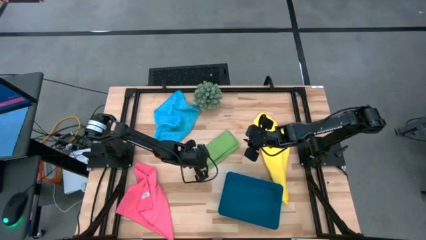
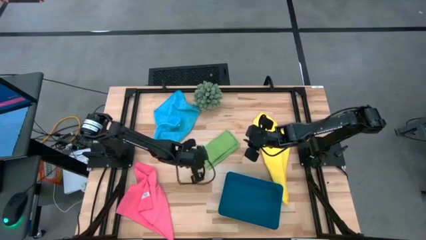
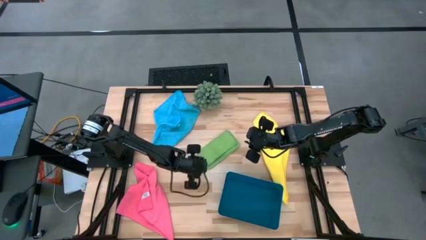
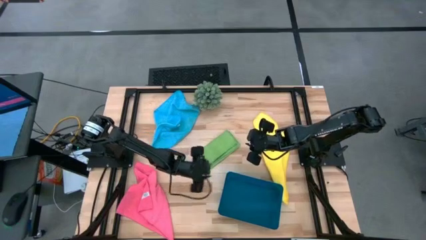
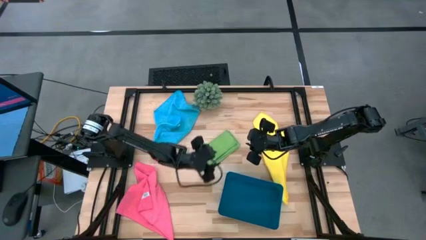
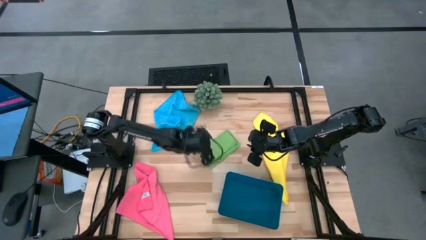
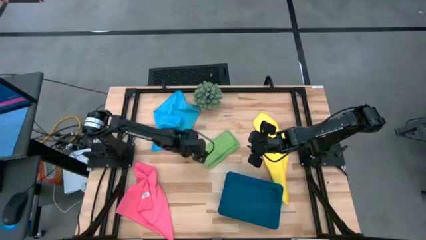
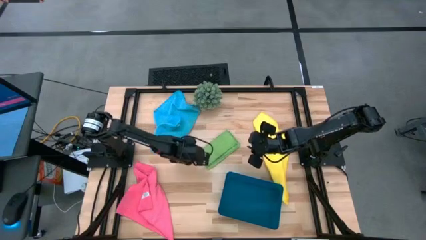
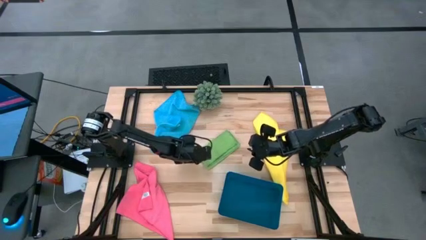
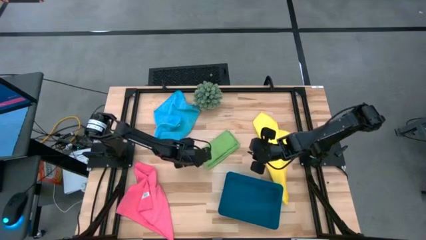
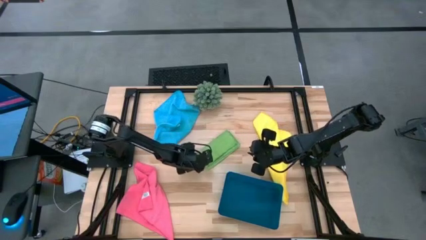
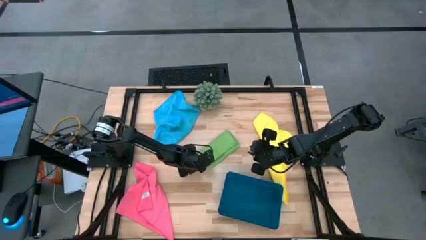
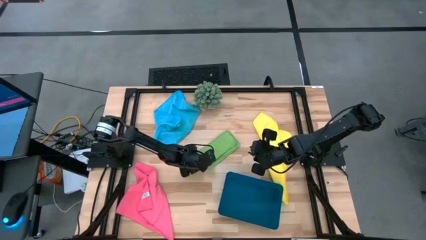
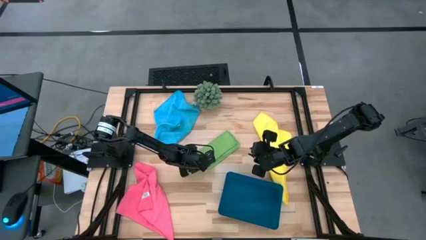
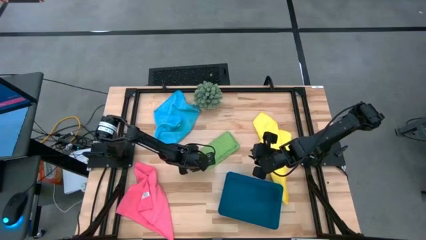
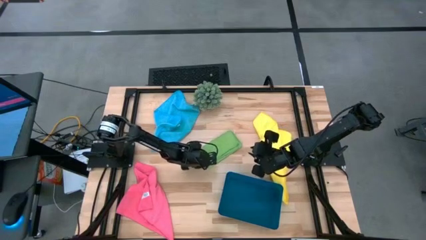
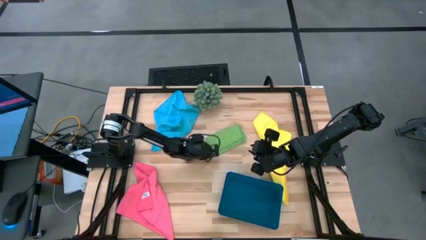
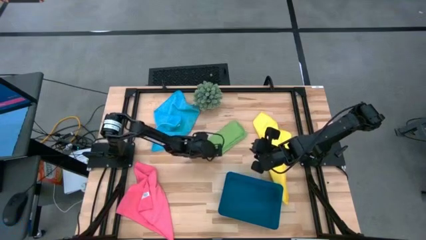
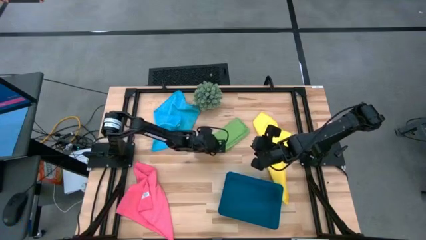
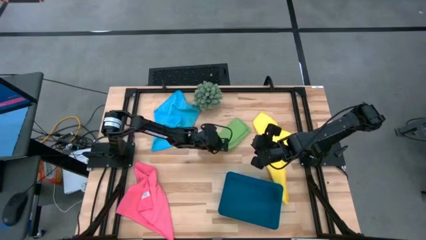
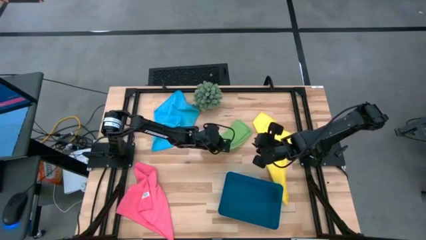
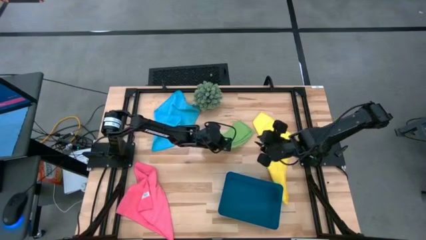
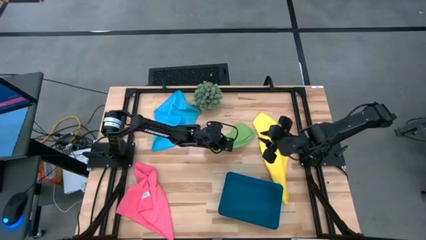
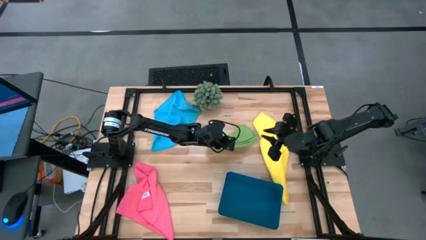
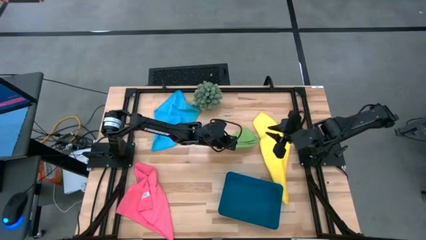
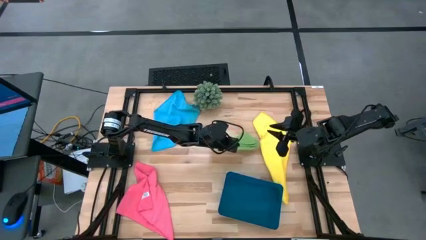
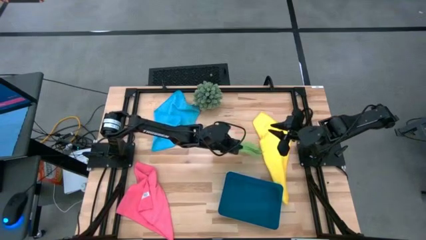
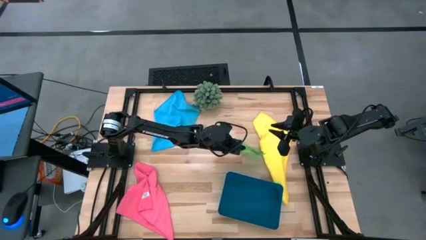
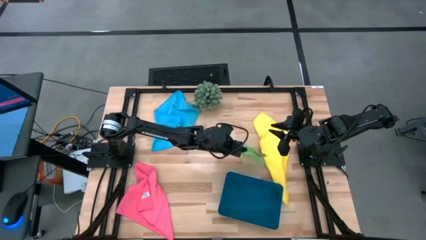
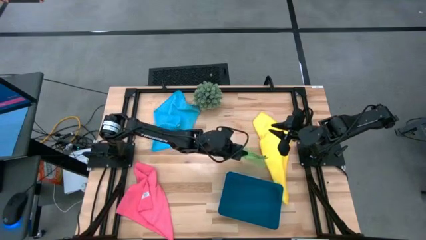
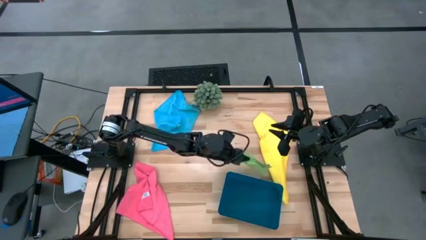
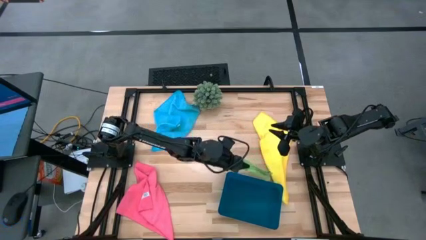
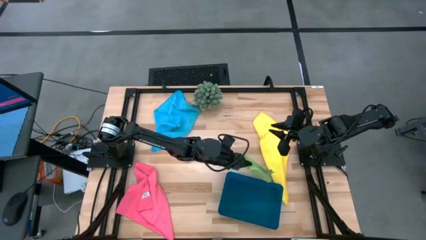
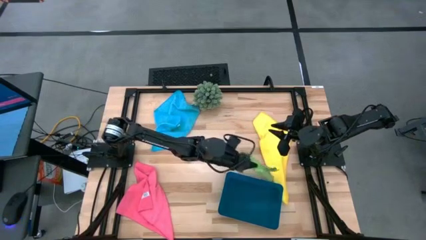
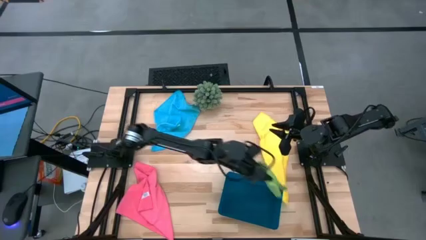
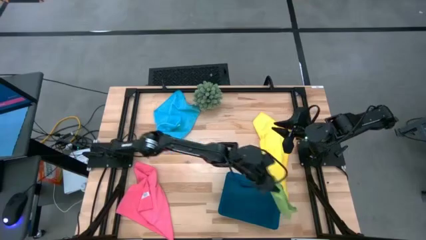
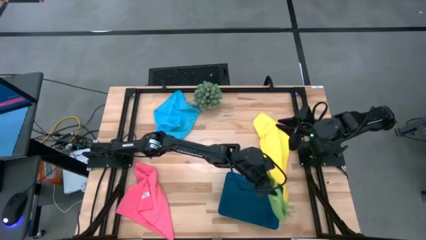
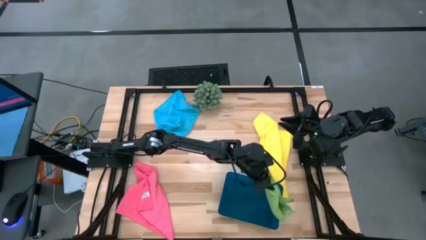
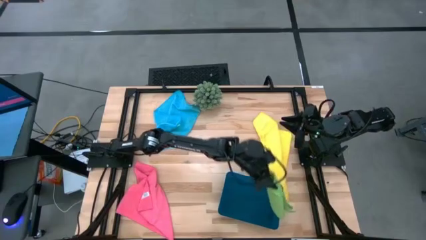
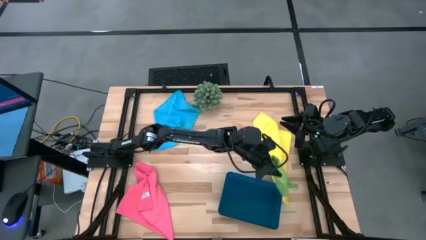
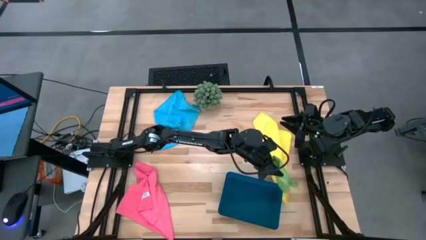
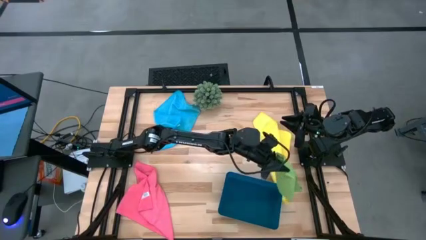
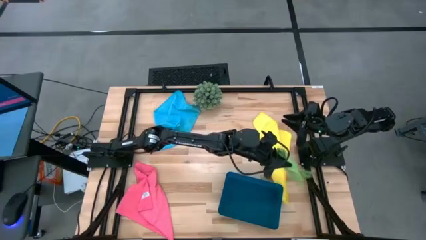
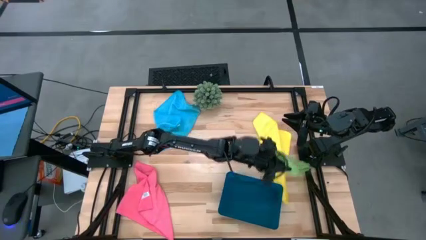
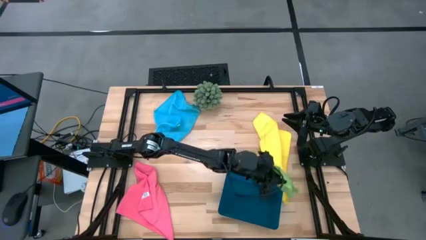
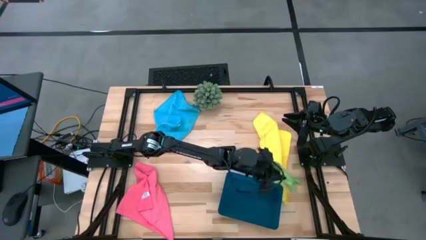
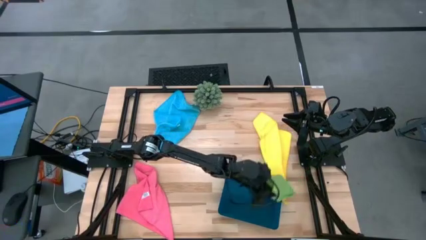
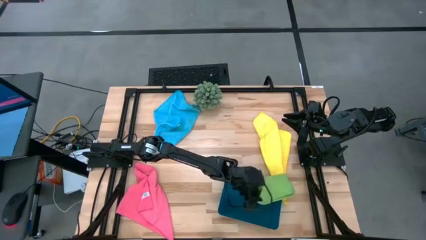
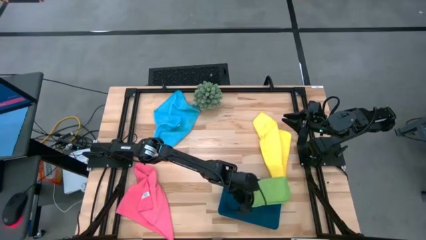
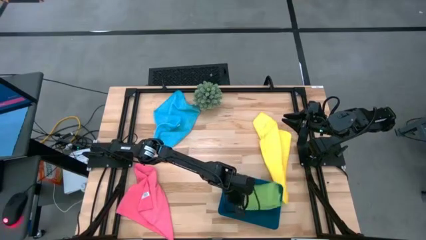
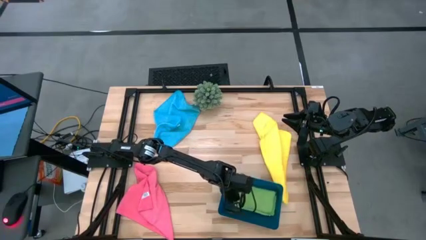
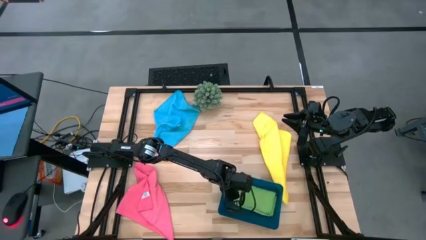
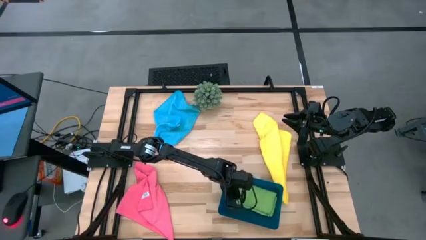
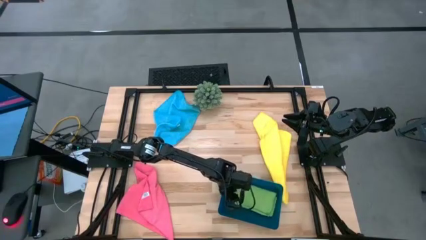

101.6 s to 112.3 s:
Task: Fold microfiber towels
Put the folded green microfiber cloth into the blue bin

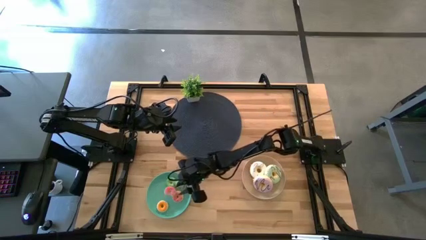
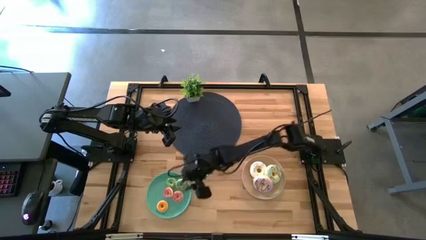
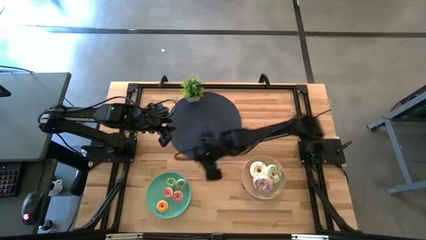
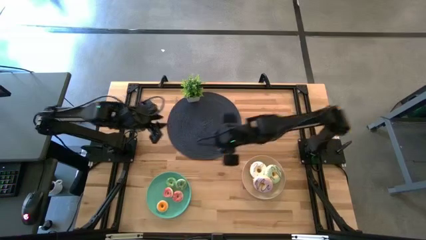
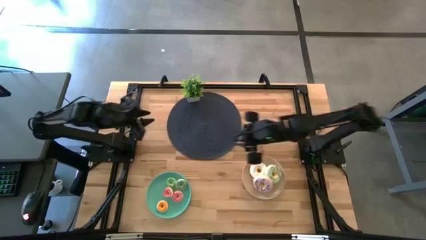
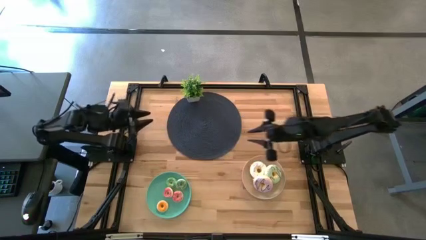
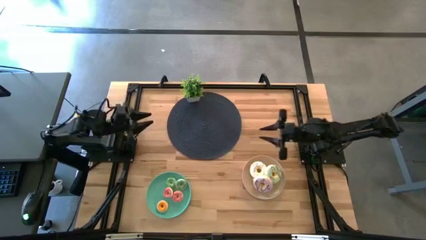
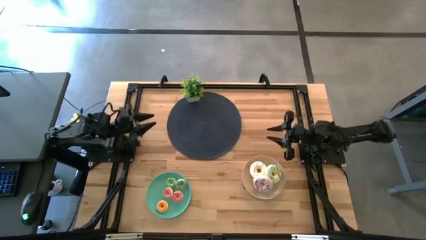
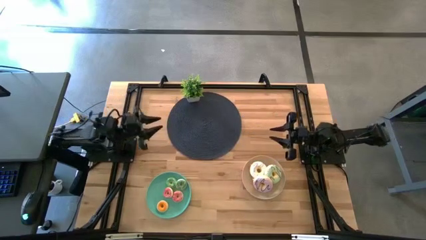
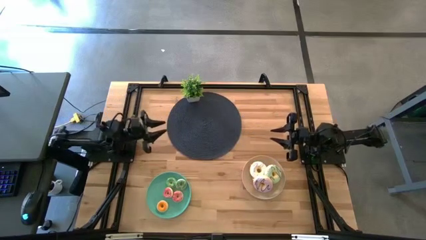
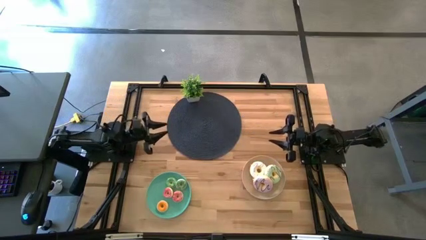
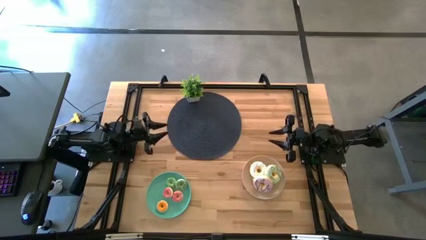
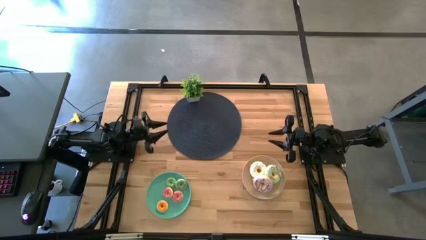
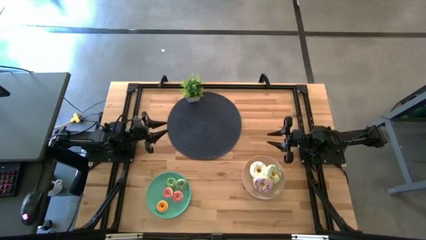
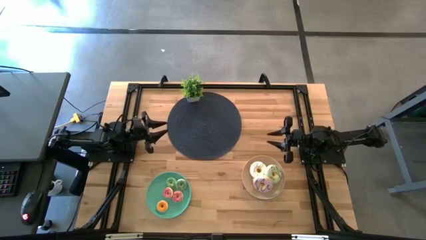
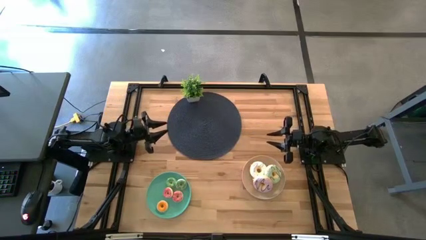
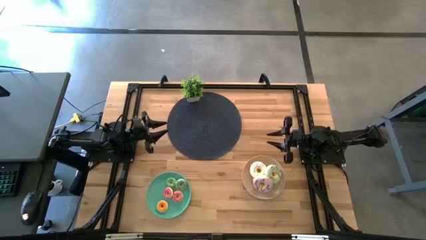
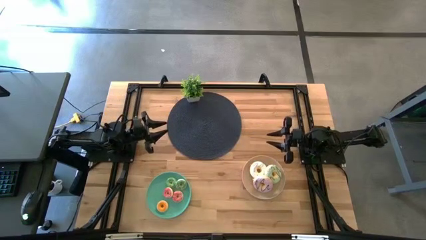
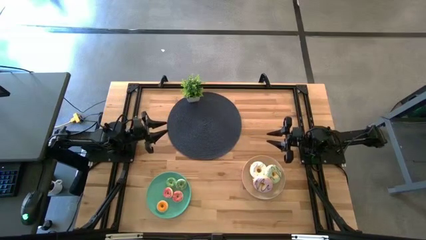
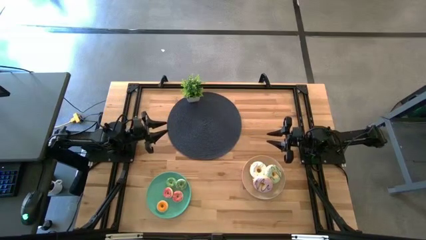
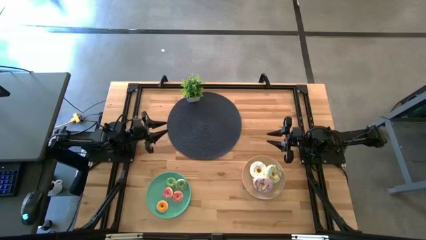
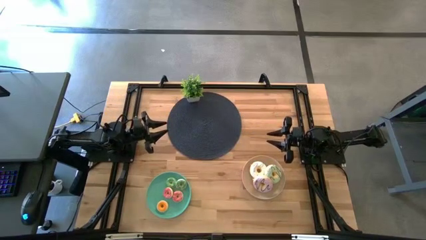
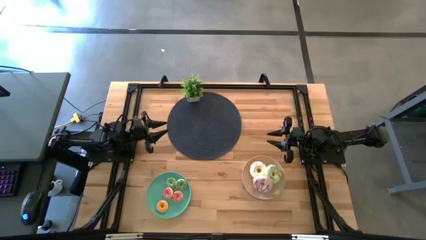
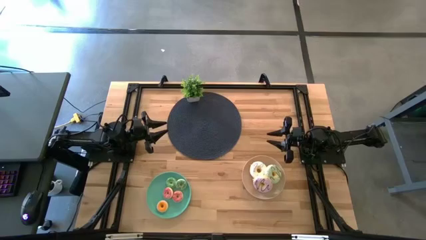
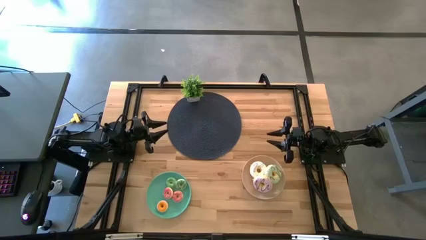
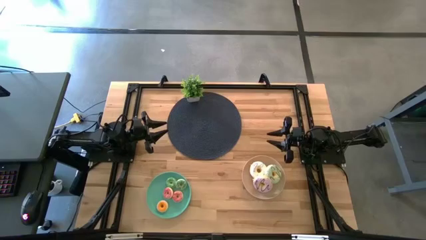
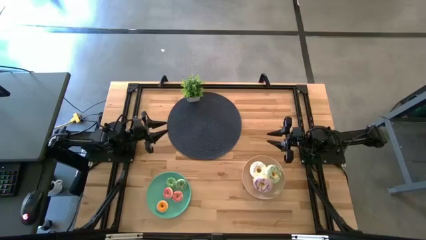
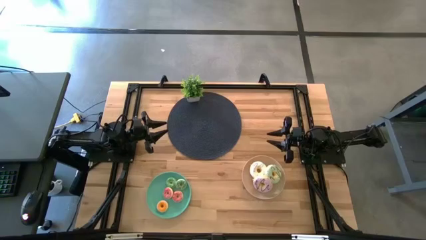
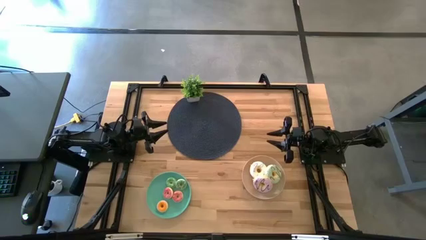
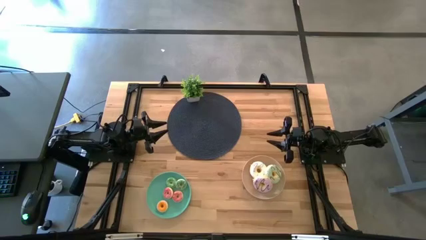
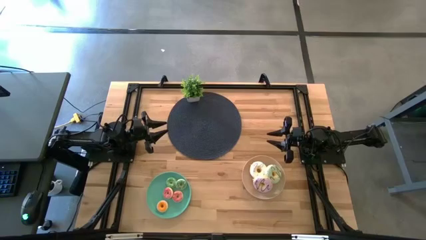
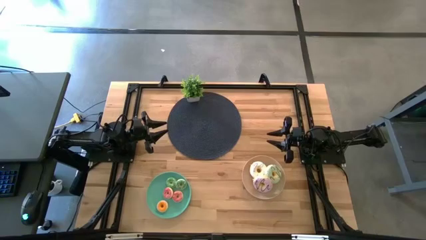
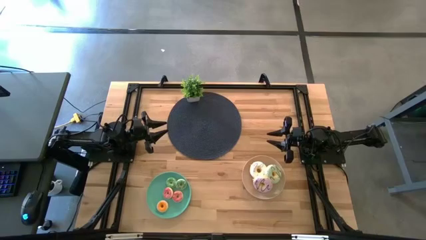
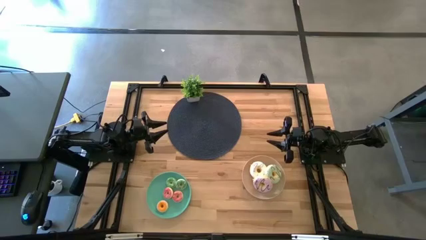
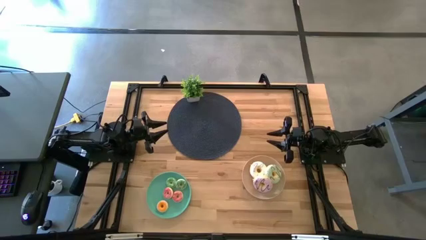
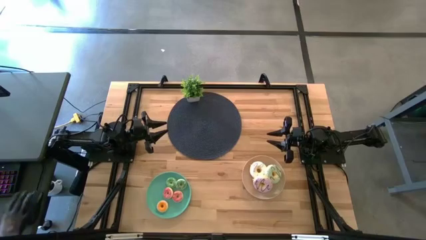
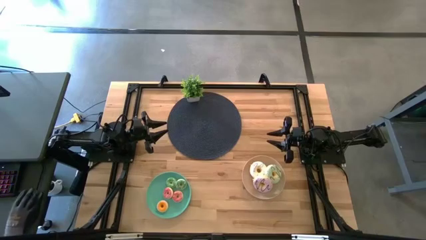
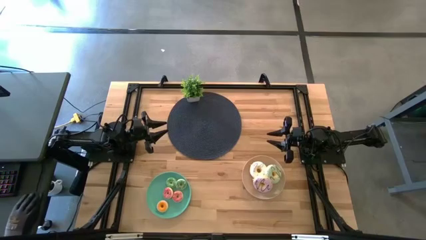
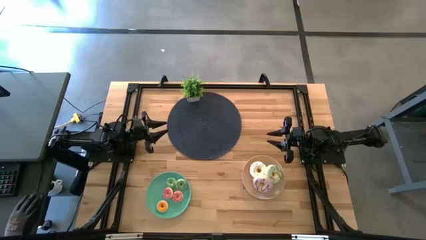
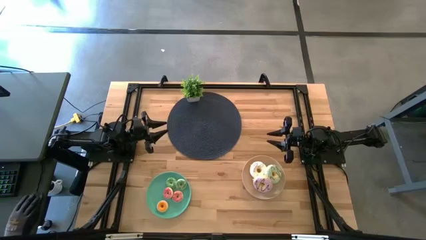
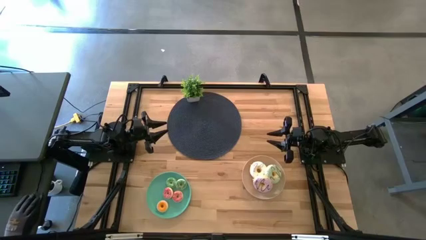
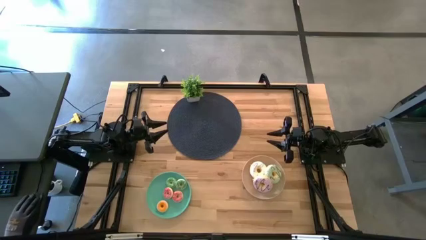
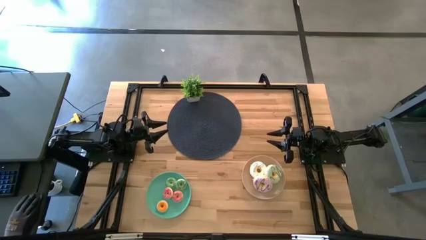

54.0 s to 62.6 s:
Task: Pick & Place donuts
Return to Home Position
